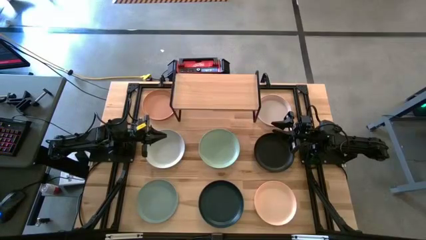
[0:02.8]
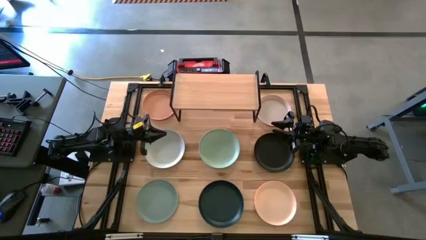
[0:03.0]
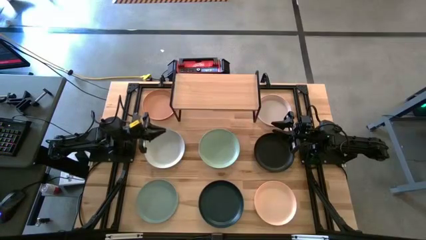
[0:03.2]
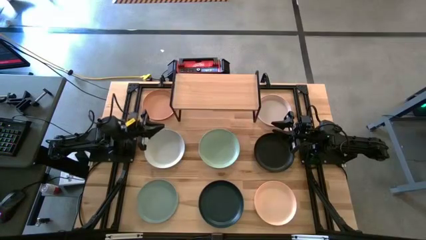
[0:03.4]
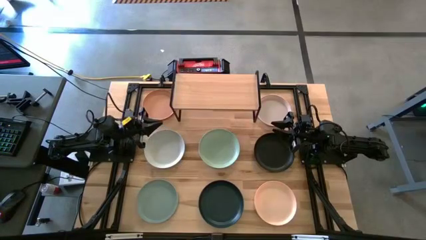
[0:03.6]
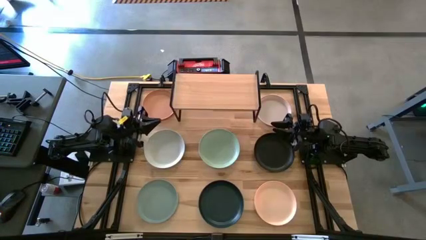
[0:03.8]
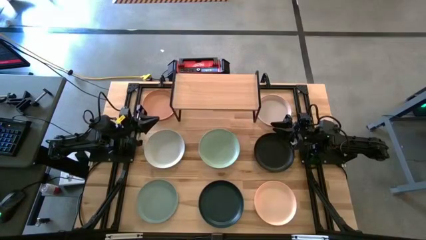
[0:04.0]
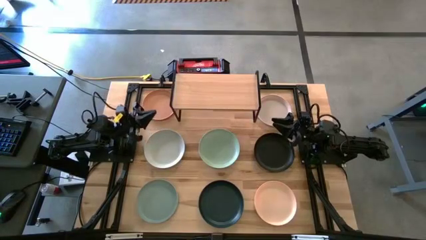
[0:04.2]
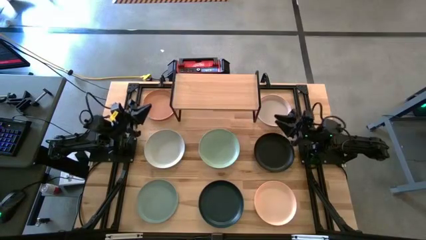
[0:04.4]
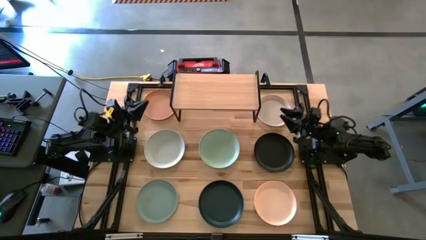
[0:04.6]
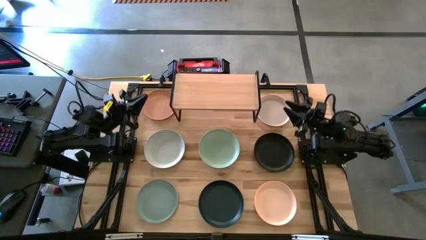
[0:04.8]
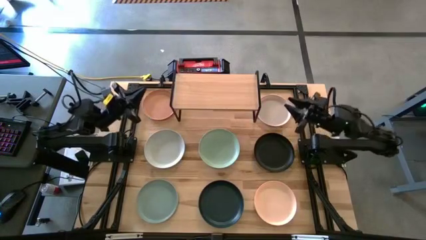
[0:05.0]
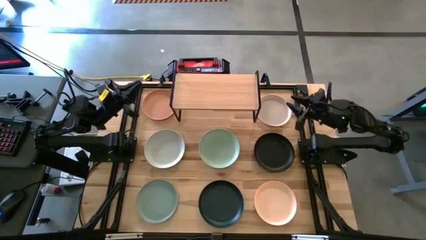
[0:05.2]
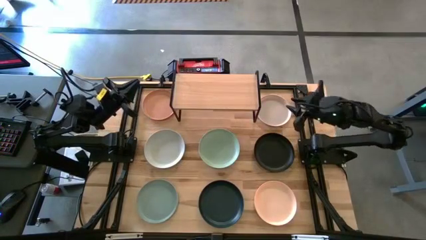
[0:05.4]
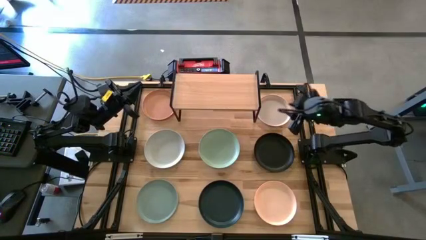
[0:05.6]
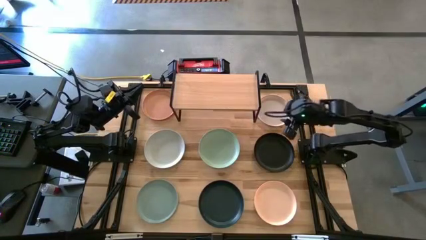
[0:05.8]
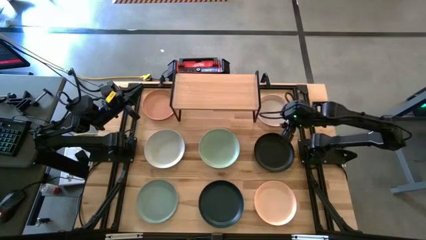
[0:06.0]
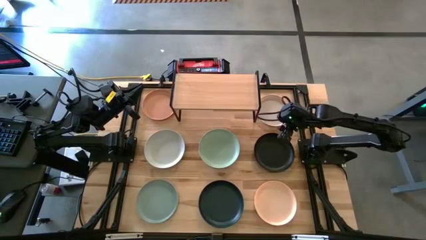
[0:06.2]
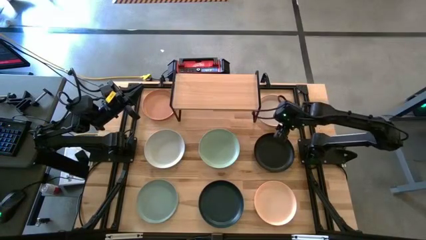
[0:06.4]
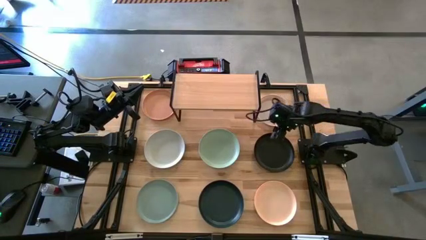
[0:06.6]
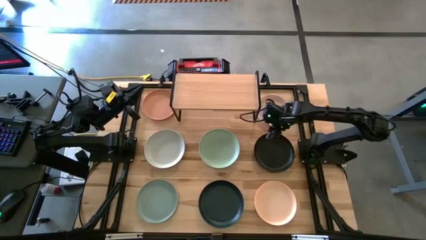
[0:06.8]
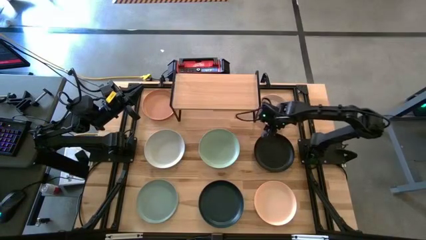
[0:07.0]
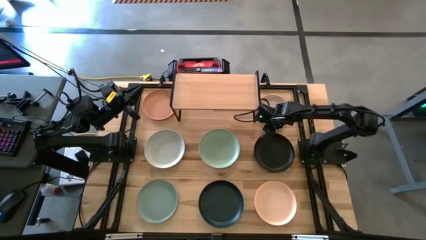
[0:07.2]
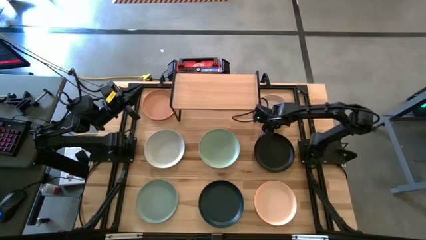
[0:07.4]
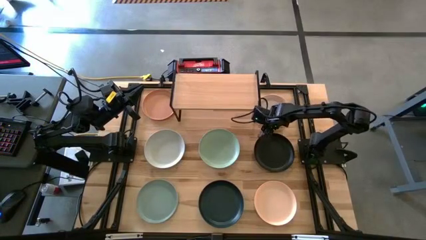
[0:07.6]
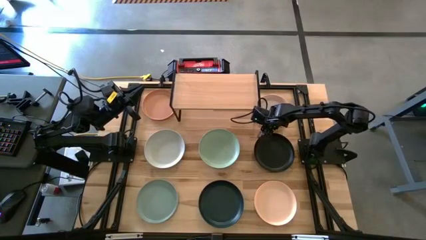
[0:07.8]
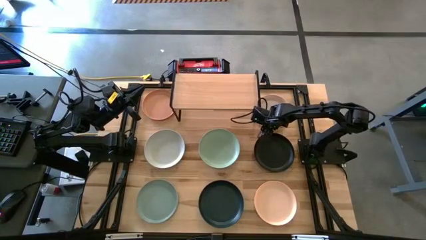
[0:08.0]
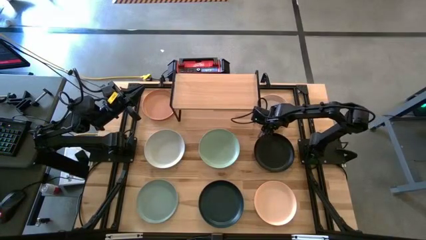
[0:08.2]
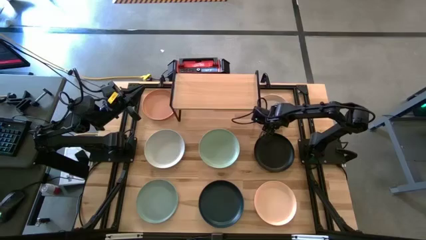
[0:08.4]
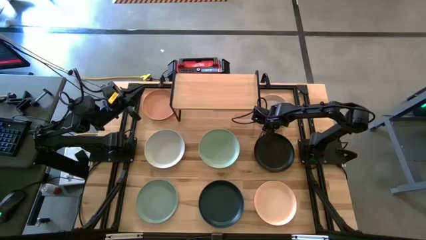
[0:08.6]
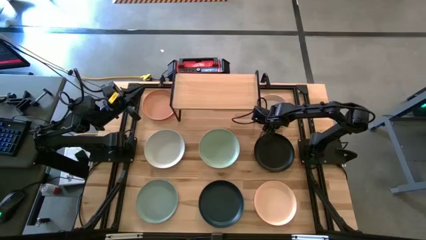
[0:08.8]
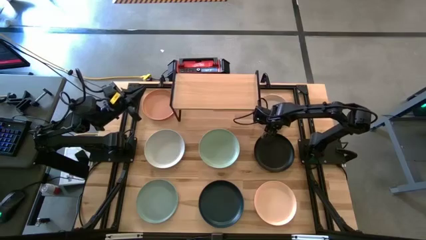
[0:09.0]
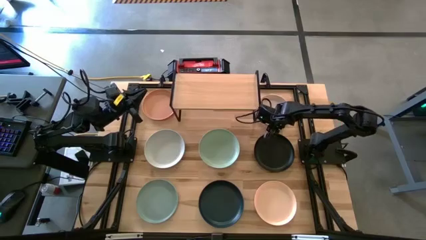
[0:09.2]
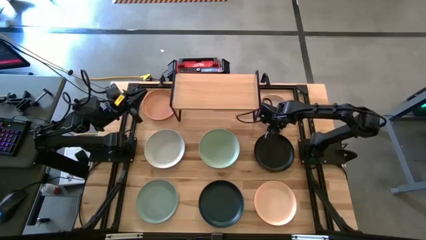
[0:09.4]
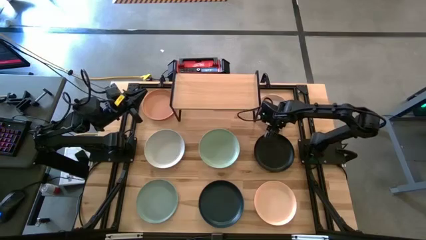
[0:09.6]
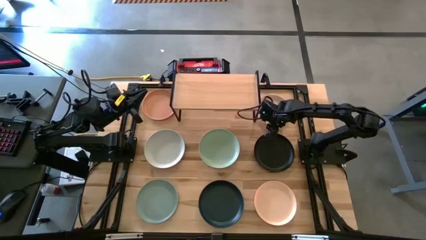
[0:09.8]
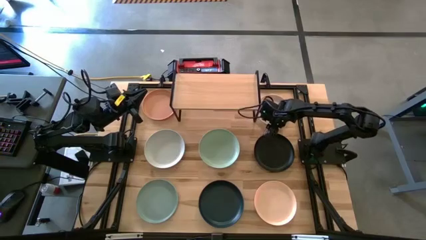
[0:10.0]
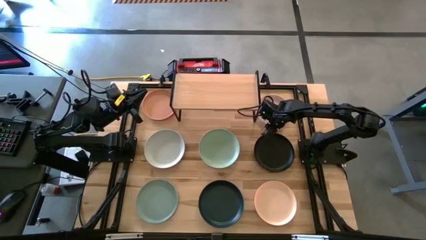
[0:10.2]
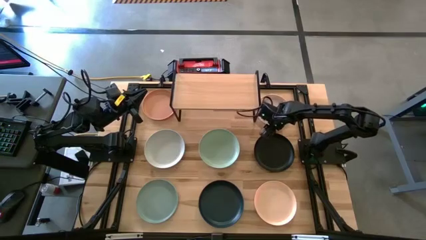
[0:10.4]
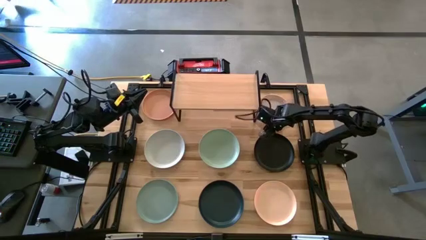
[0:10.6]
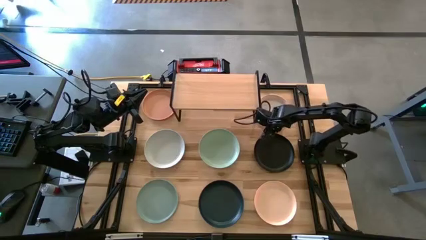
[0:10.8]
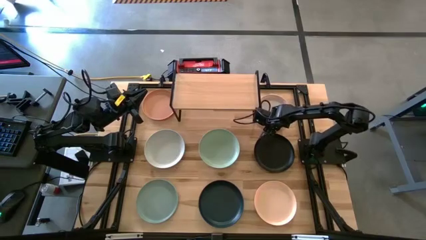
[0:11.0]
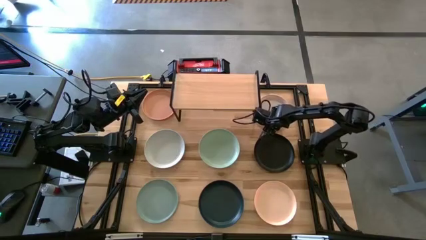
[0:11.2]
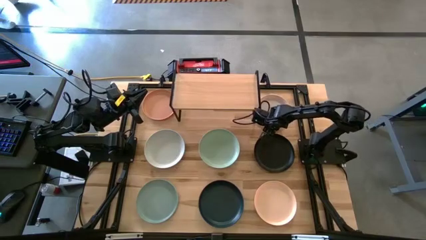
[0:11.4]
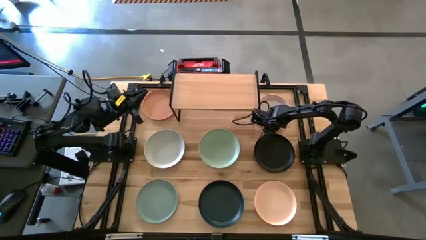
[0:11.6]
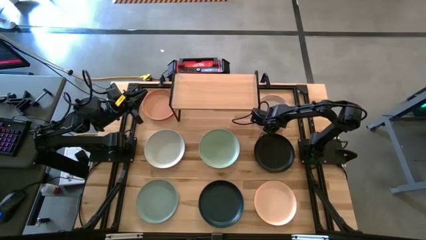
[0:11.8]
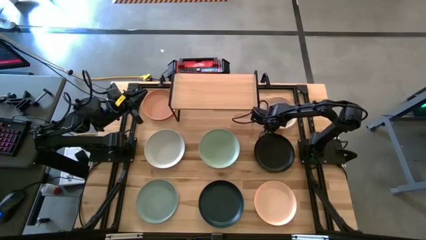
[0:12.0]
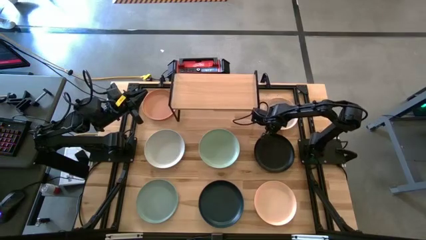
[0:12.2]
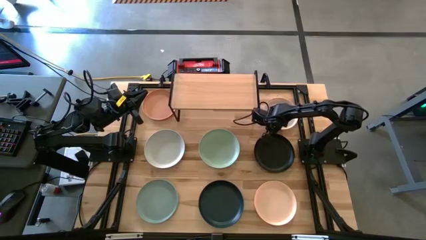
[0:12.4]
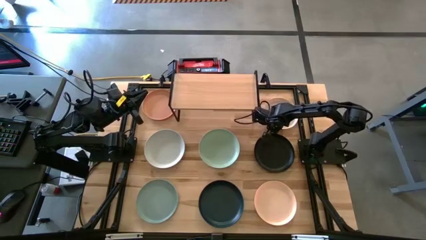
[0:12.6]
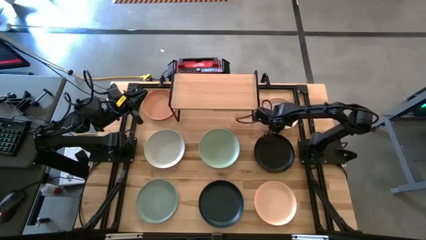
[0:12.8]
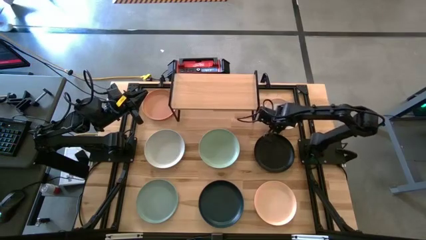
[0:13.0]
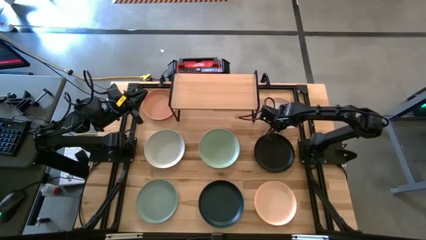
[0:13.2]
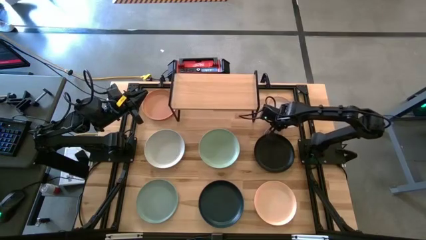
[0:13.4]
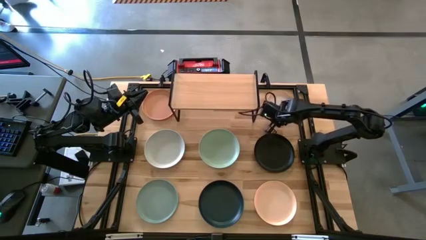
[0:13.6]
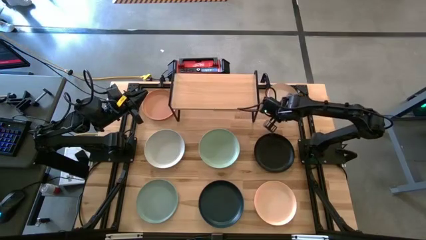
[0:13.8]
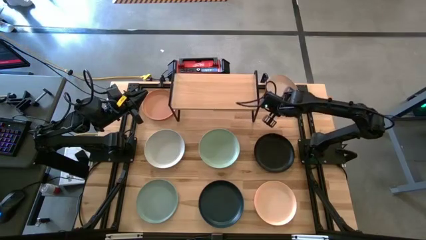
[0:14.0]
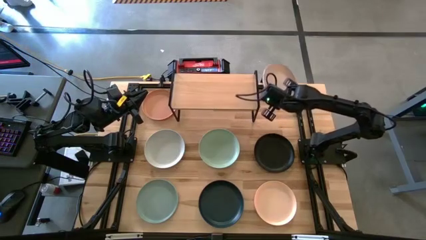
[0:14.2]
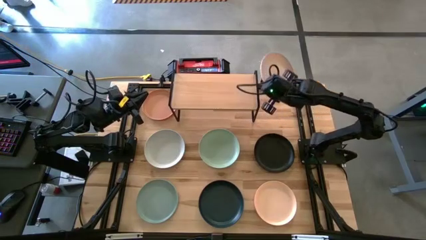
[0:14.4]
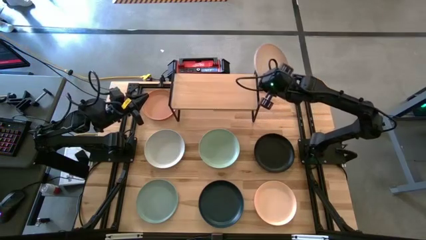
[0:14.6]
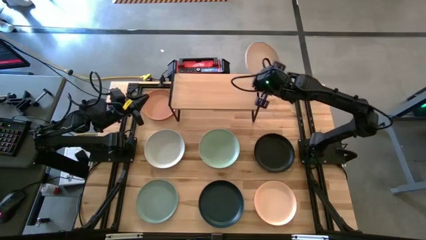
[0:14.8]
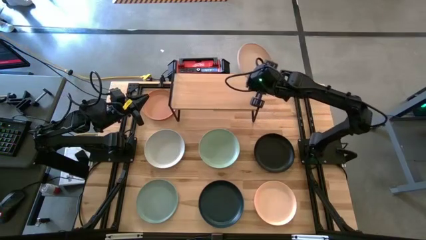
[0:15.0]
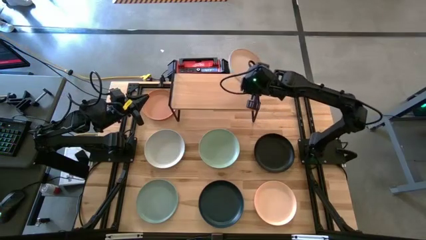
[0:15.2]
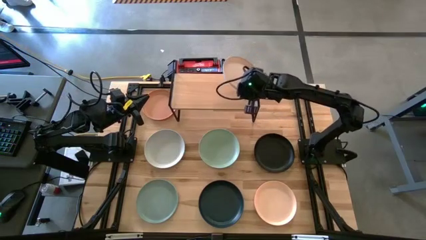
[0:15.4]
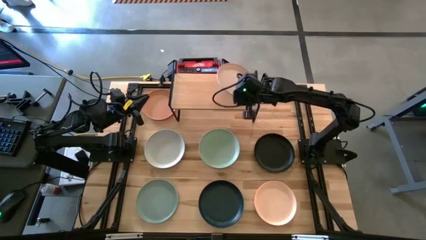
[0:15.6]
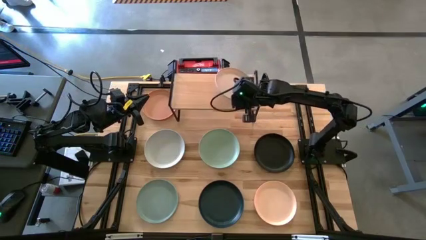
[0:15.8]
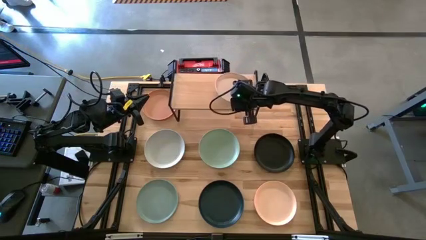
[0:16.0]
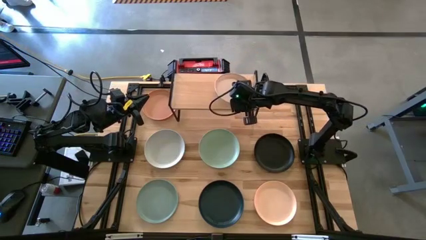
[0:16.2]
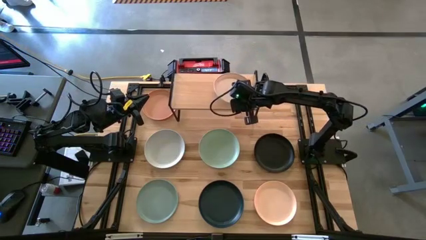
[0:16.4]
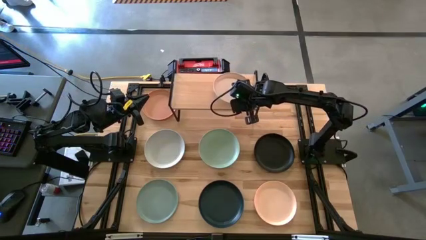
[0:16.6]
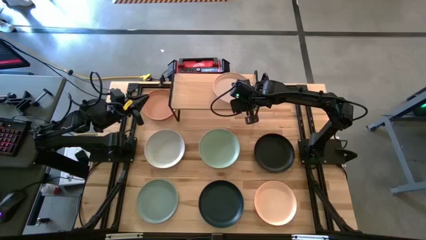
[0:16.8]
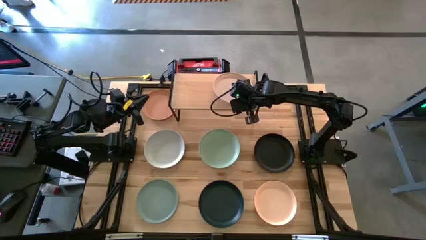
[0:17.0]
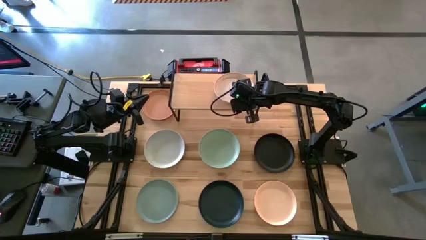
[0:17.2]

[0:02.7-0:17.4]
Task: Place and stack plates onto a shelf
Put the light brown plate on the shelf
